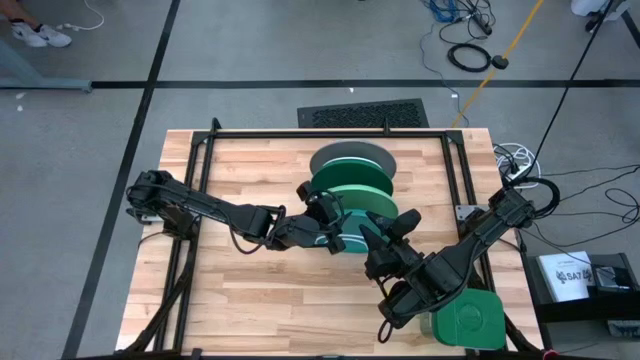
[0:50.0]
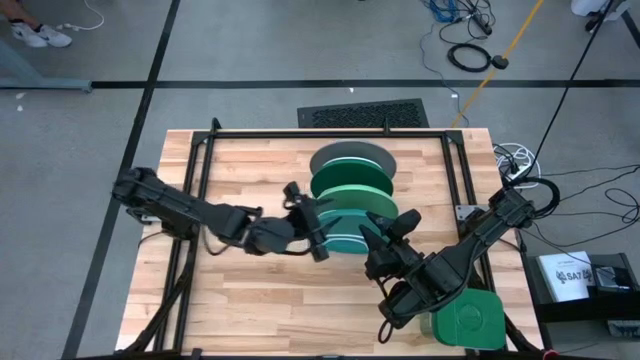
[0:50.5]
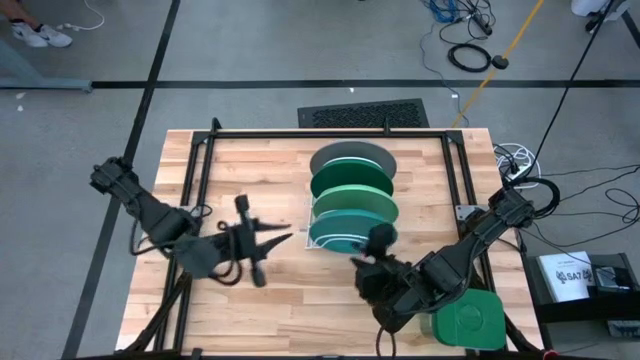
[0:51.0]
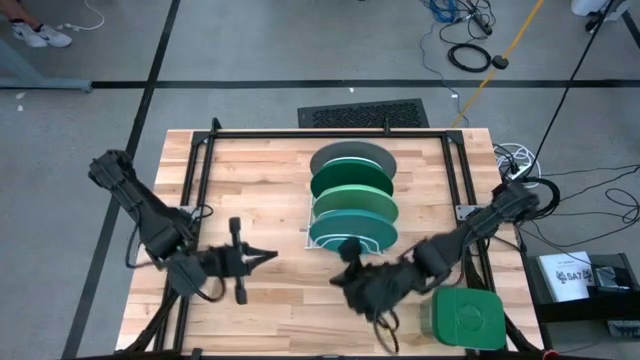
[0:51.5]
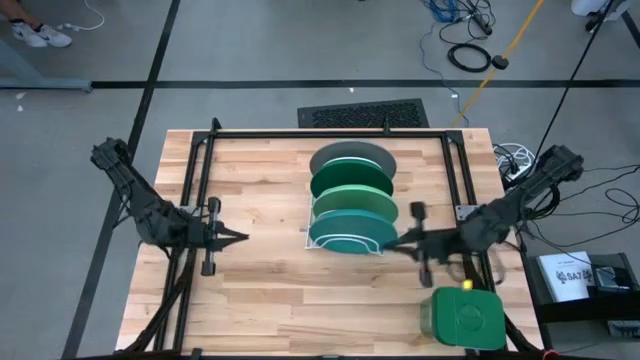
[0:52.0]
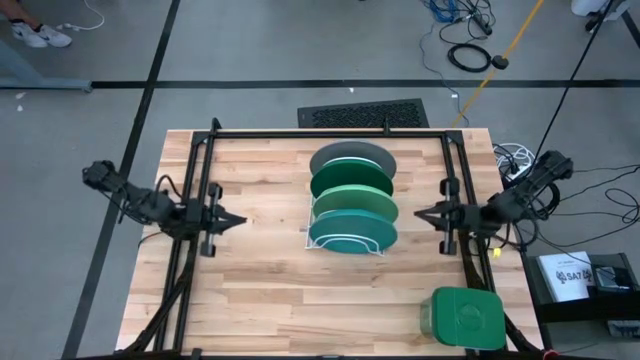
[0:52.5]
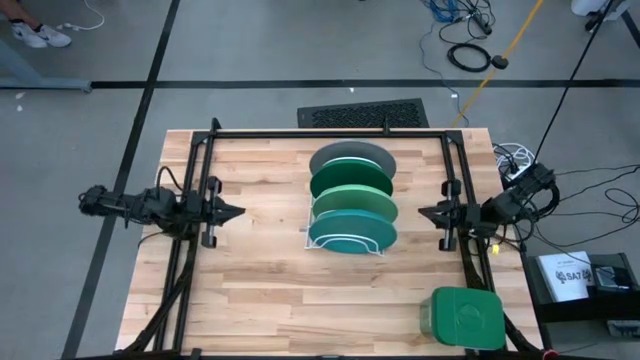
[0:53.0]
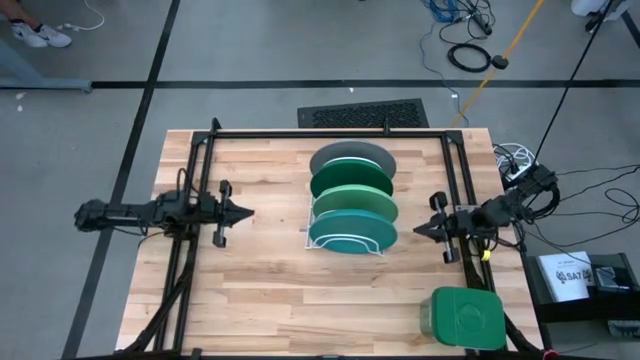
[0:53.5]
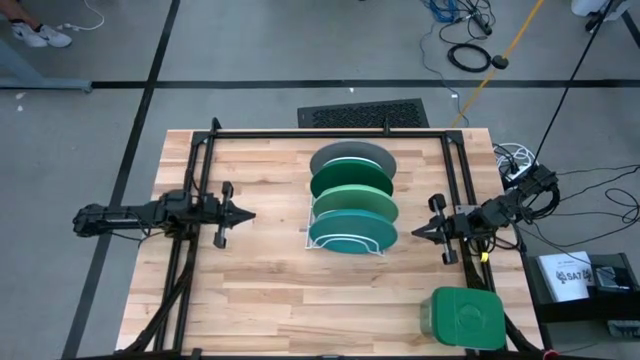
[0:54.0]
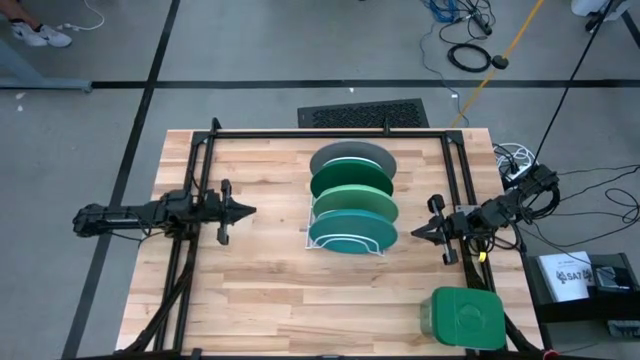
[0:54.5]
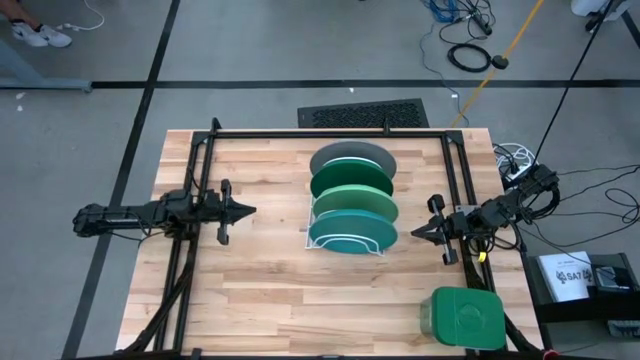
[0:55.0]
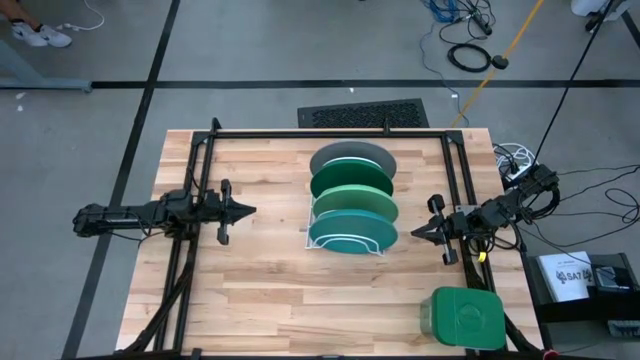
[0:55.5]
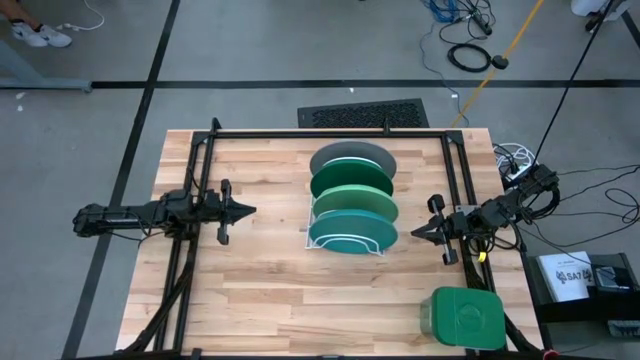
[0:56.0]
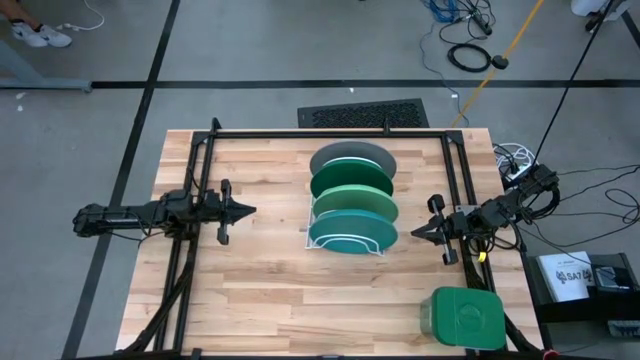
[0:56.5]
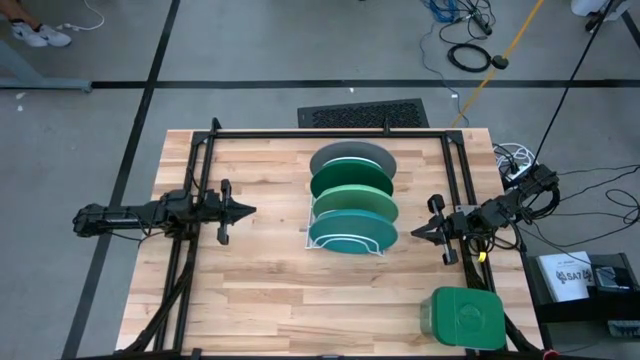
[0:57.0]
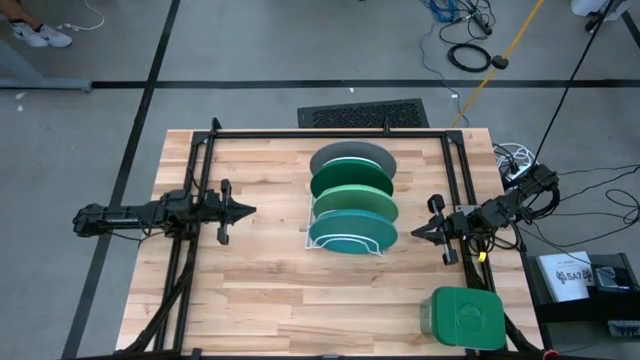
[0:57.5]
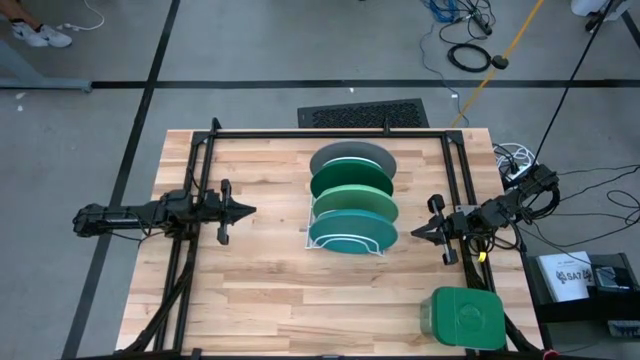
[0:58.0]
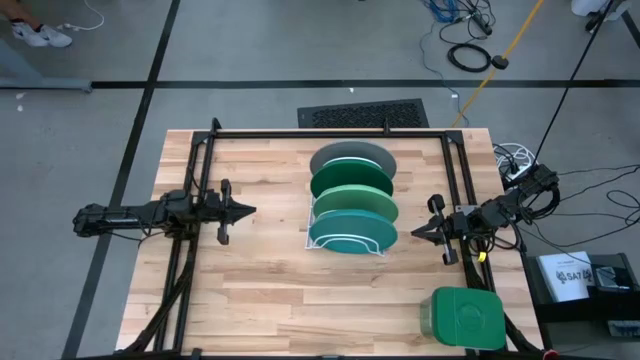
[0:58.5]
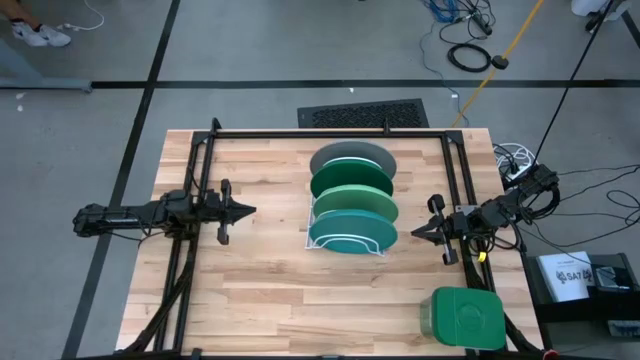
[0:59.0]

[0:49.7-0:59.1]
Task: Sort dishes
Return to Home Position

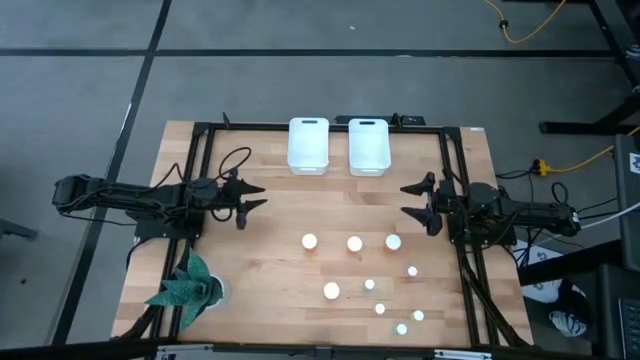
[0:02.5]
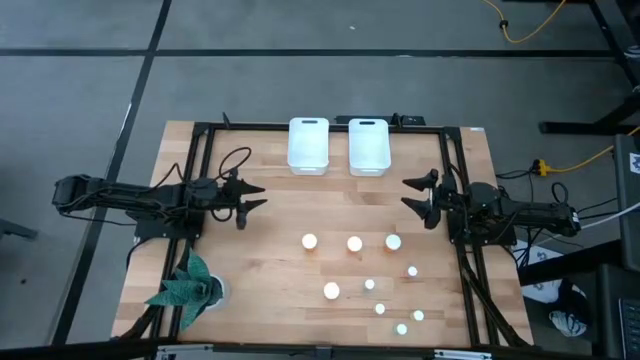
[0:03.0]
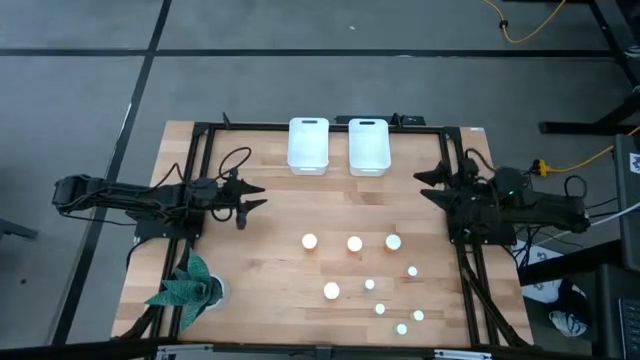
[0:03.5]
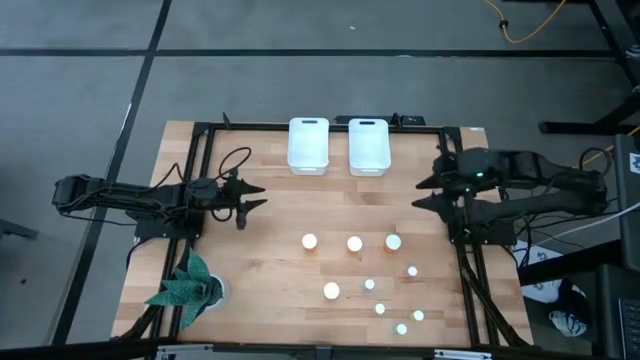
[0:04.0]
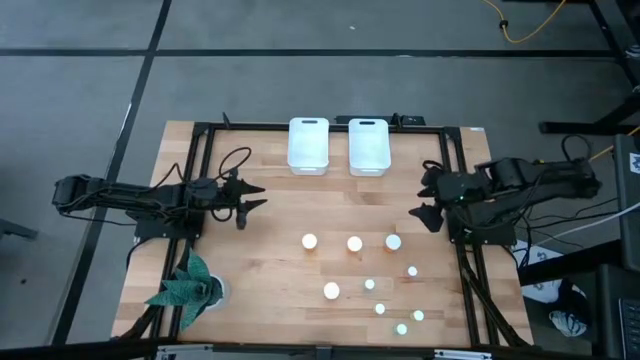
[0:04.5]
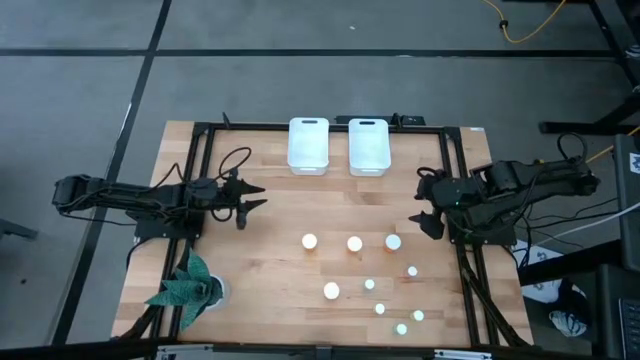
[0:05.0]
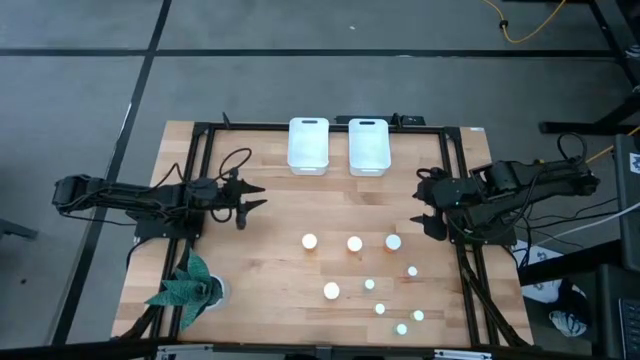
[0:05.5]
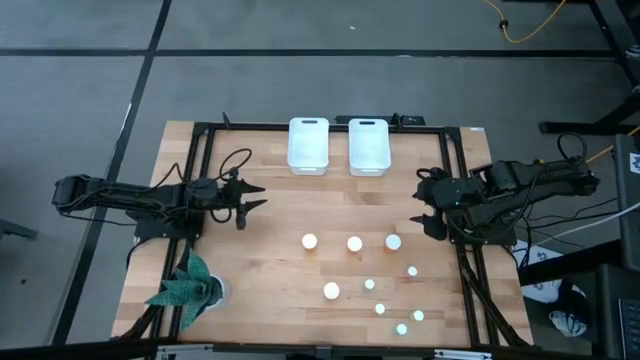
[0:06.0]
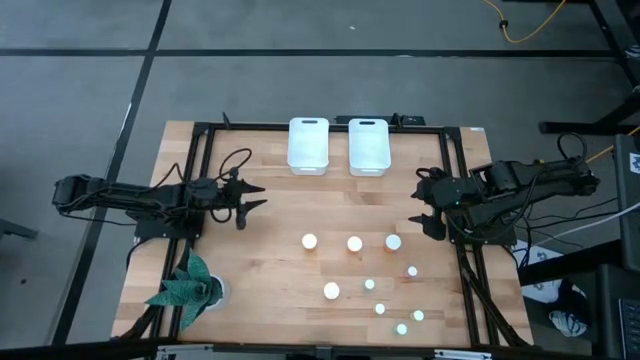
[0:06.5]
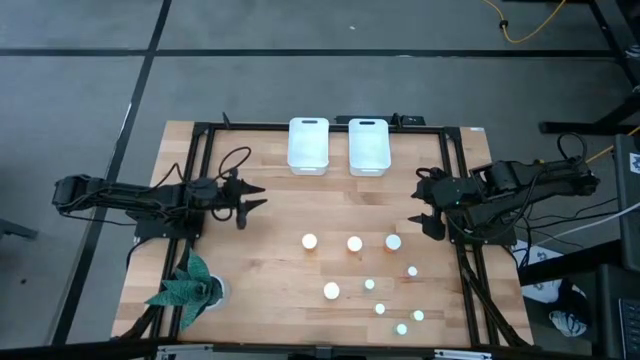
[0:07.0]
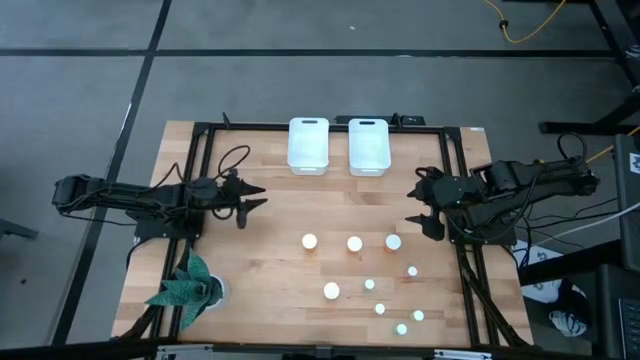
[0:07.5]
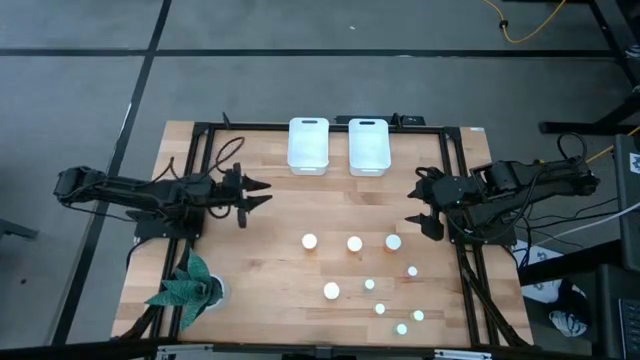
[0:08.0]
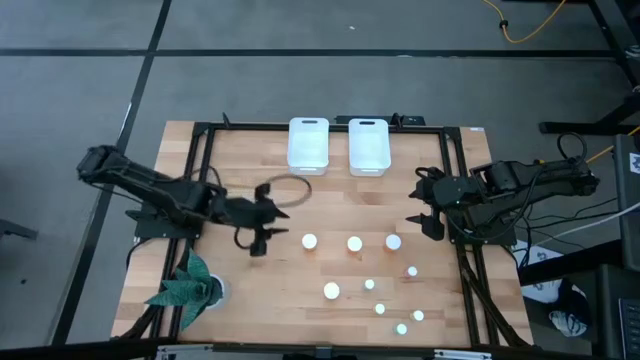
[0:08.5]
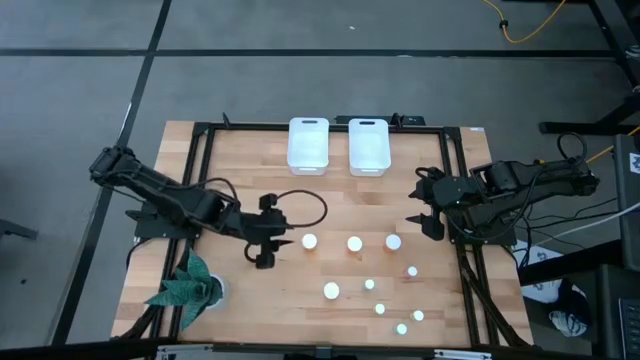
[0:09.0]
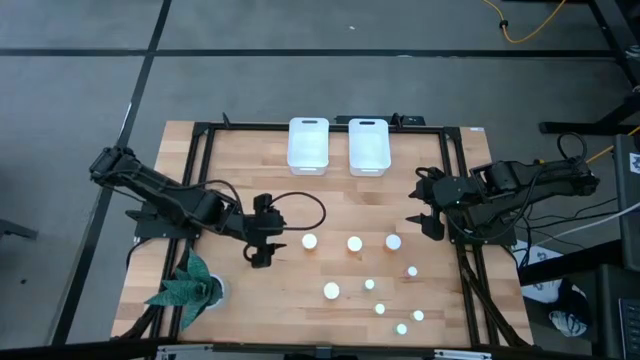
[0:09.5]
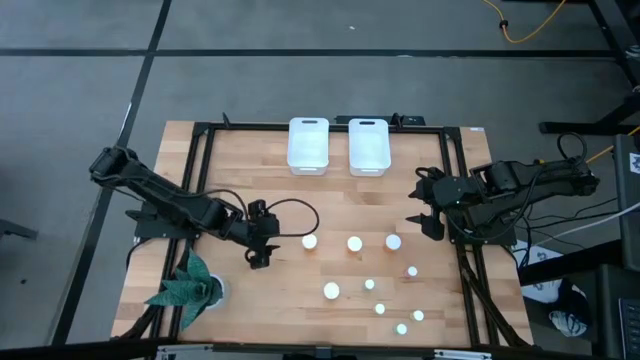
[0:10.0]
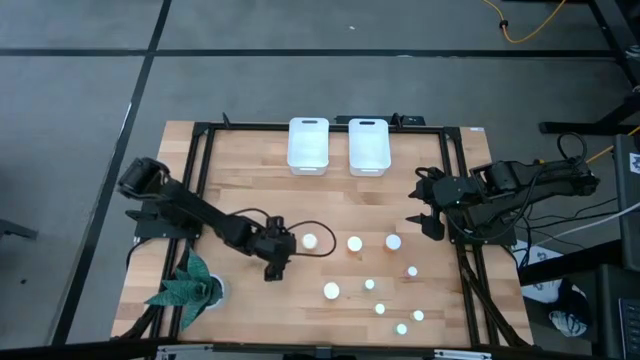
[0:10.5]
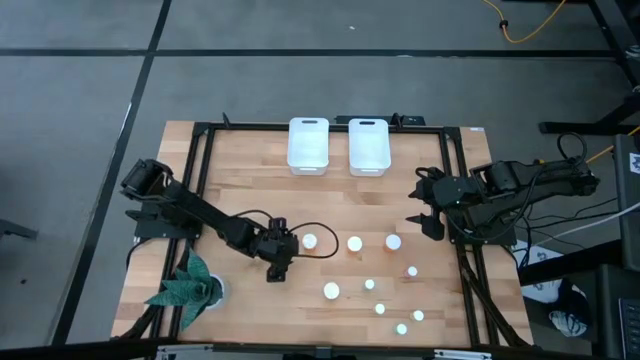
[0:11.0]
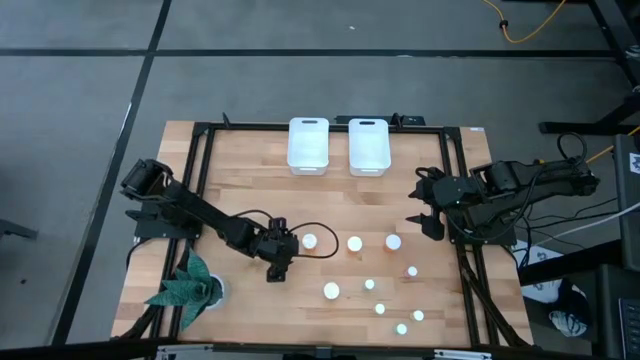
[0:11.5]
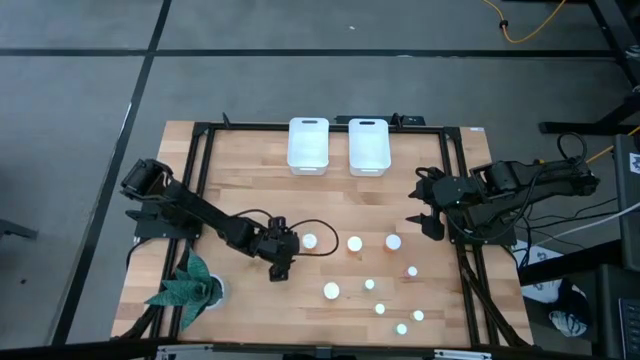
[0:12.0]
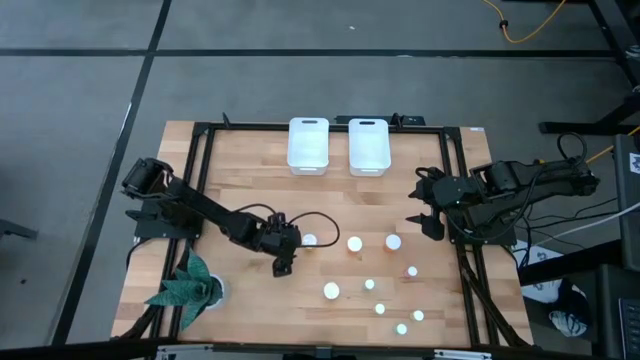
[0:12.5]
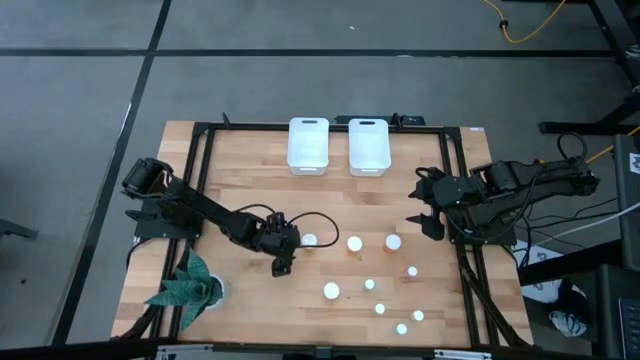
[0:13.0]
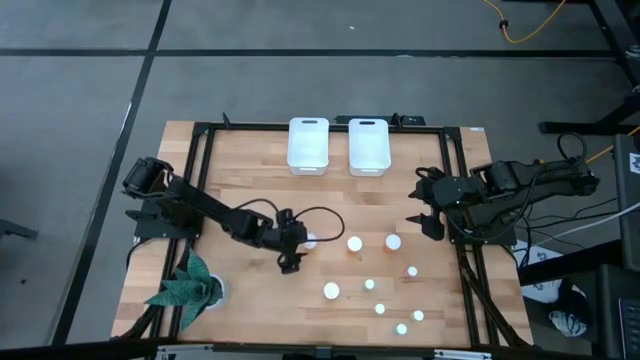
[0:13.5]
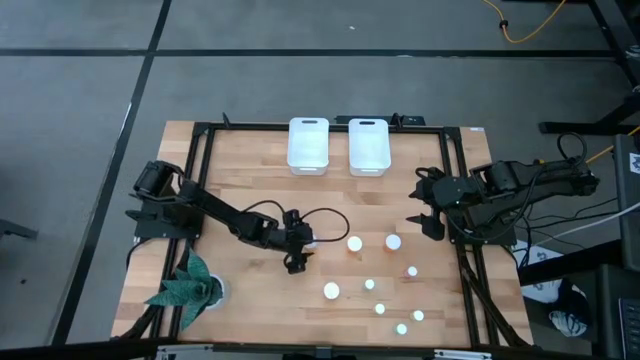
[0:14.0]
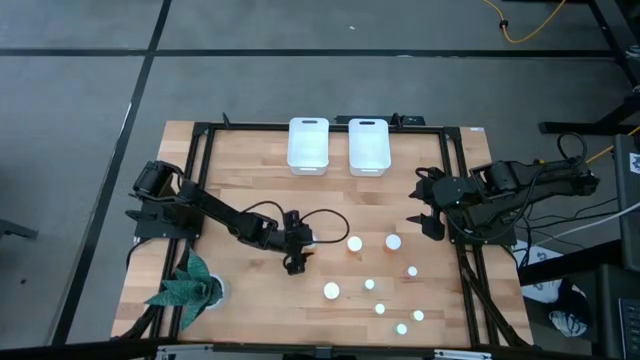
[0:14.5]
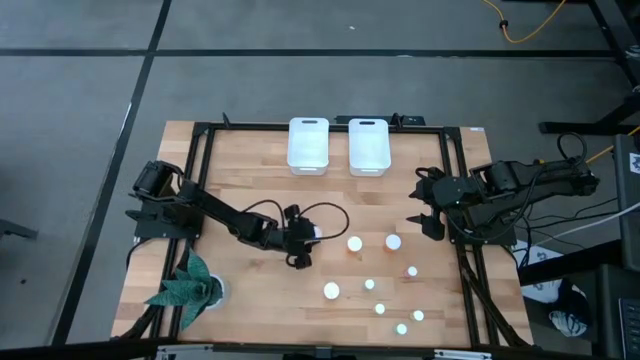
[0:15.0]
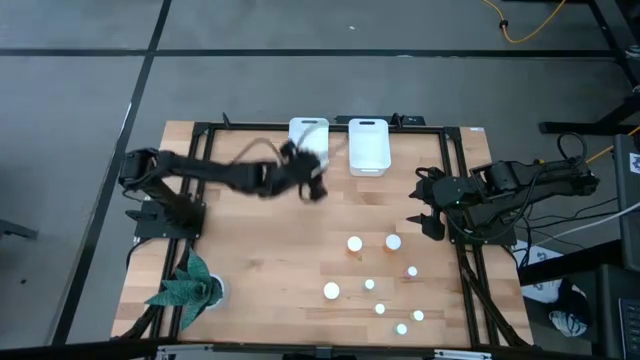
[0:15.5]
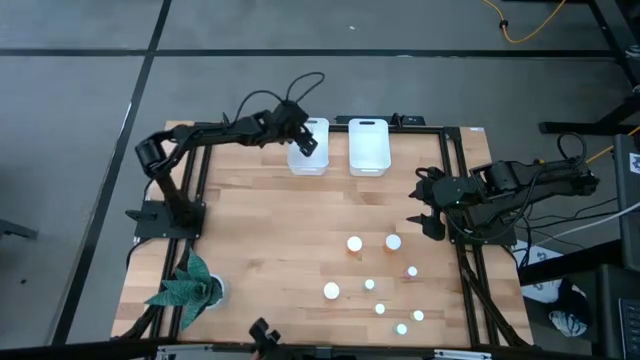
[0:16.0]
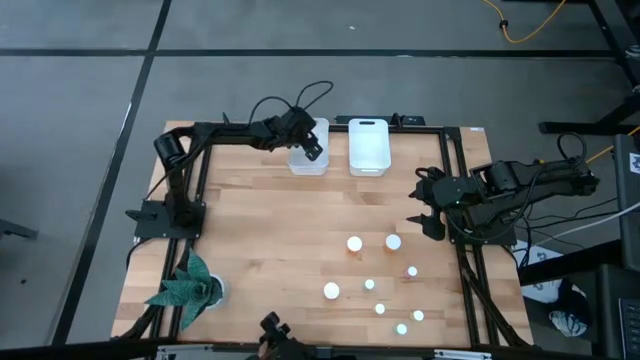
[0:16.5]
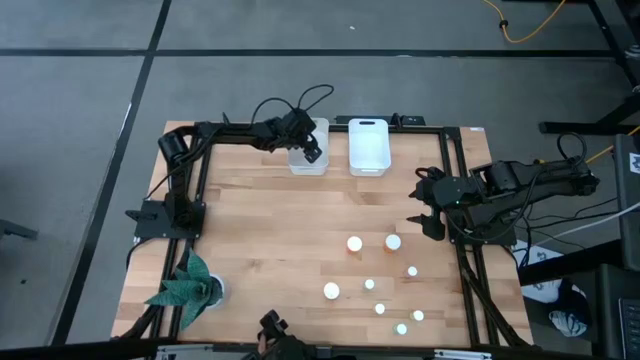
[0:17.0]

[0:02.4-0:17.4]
Task: Pick and place medicine bottles into bin by pill shape (circle, oval)
Put the orange capsule bottle into the left white bin
